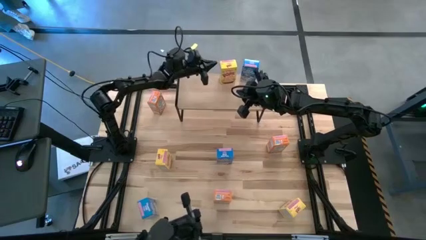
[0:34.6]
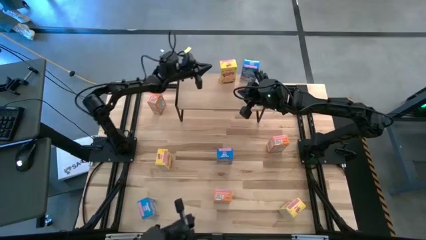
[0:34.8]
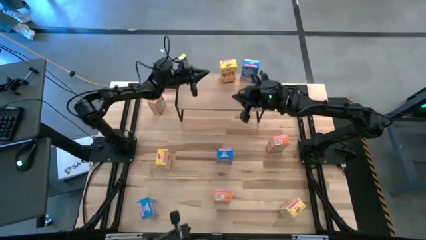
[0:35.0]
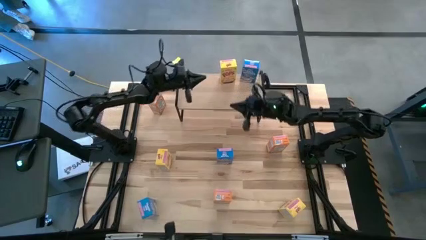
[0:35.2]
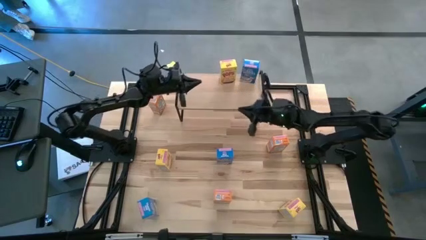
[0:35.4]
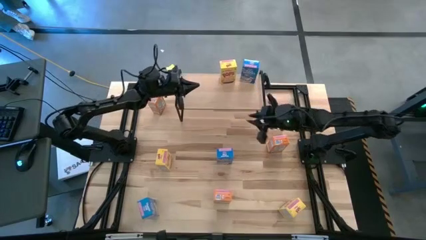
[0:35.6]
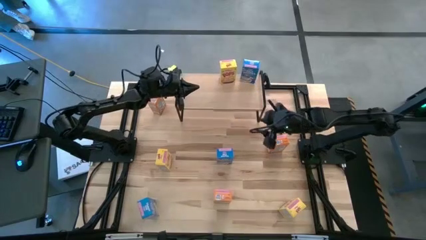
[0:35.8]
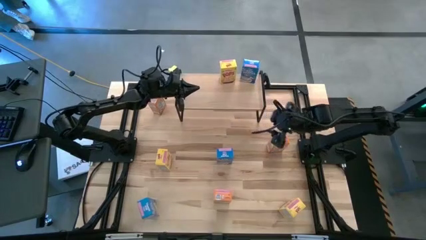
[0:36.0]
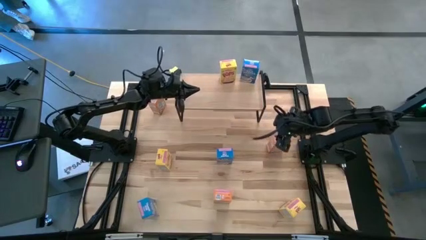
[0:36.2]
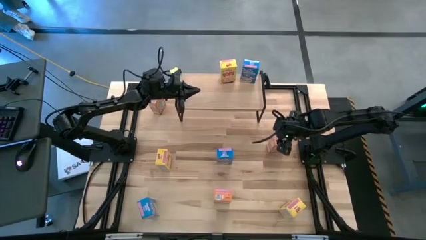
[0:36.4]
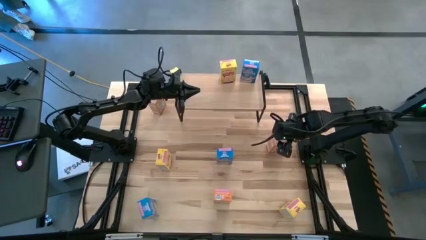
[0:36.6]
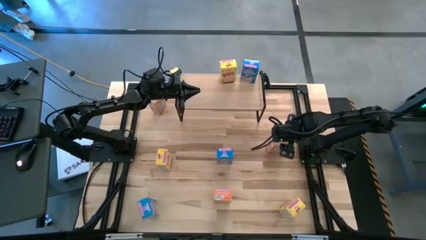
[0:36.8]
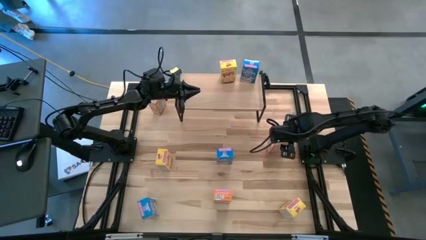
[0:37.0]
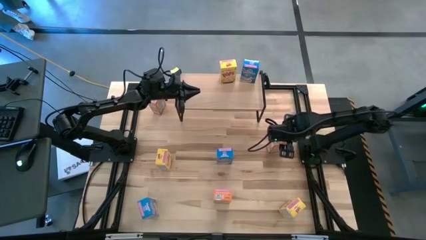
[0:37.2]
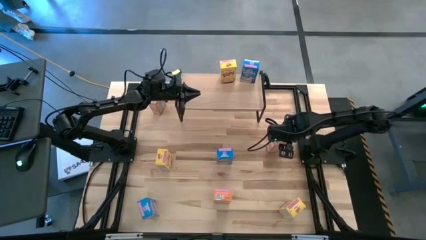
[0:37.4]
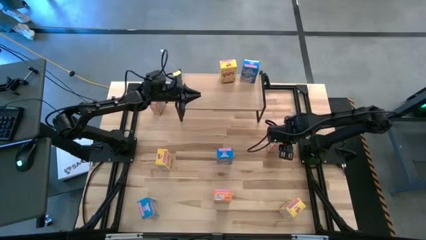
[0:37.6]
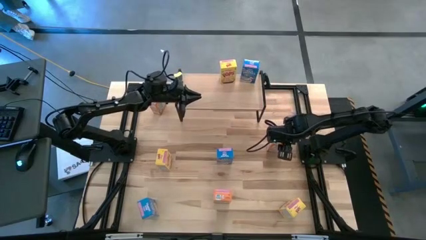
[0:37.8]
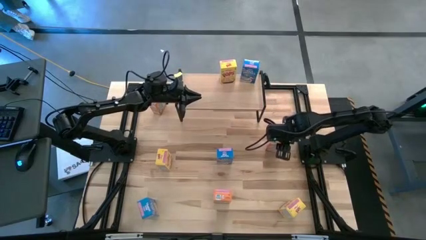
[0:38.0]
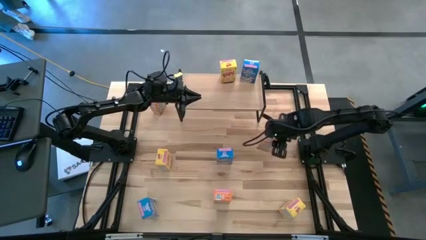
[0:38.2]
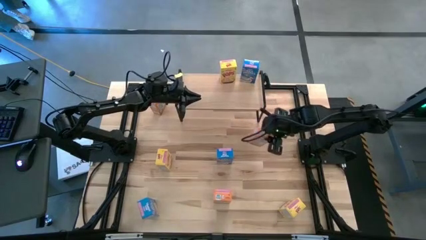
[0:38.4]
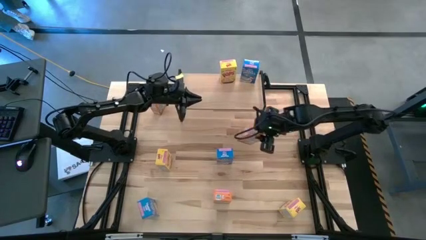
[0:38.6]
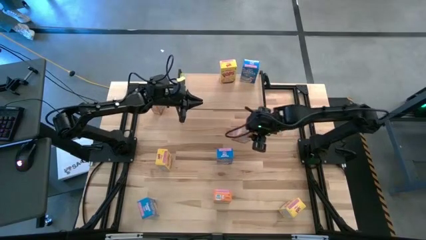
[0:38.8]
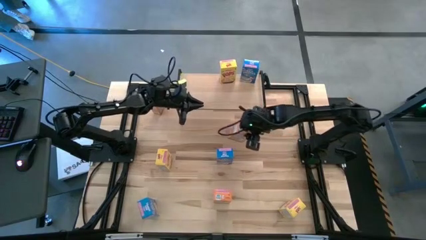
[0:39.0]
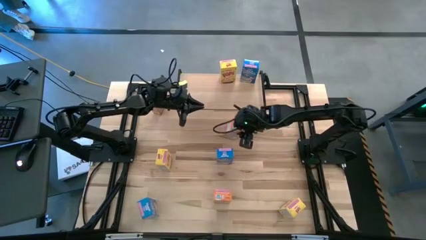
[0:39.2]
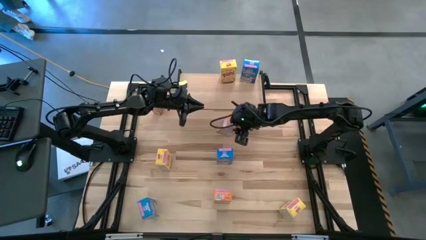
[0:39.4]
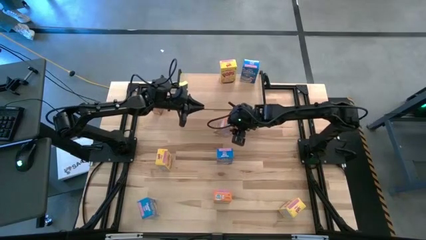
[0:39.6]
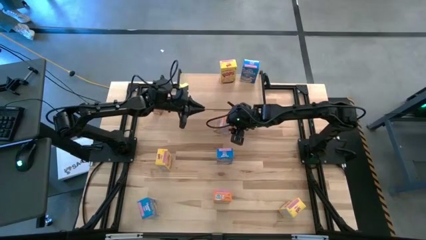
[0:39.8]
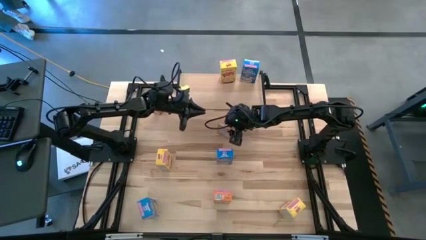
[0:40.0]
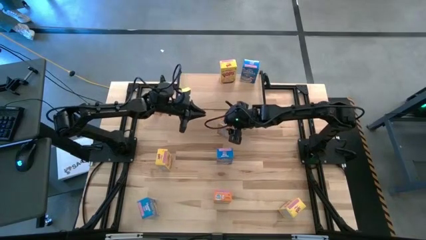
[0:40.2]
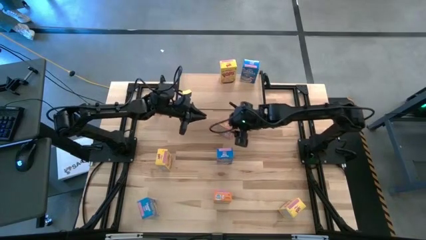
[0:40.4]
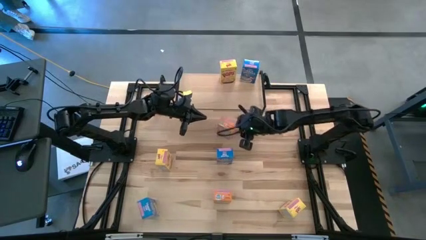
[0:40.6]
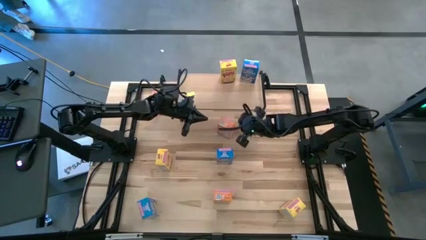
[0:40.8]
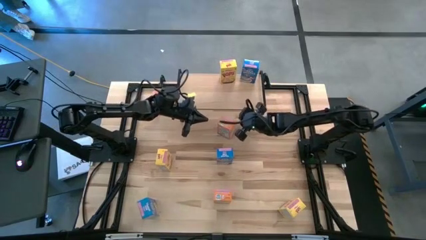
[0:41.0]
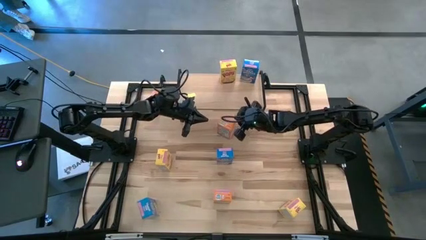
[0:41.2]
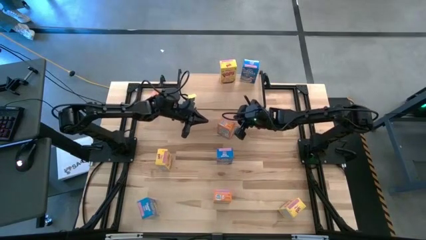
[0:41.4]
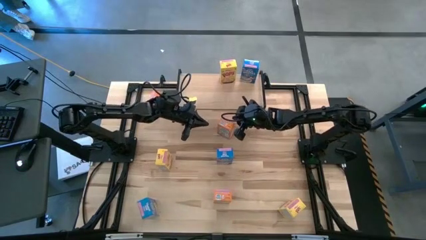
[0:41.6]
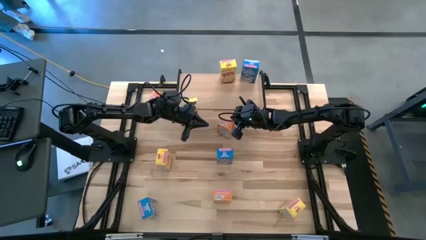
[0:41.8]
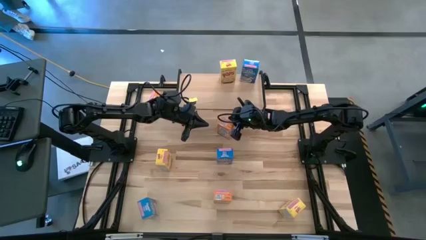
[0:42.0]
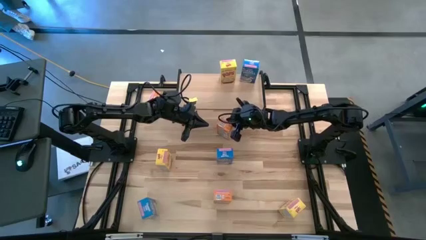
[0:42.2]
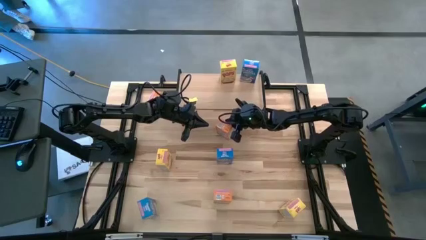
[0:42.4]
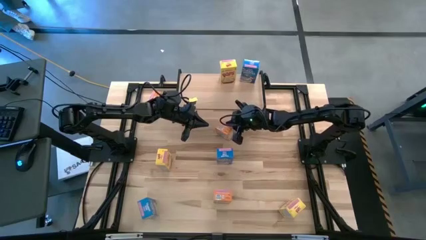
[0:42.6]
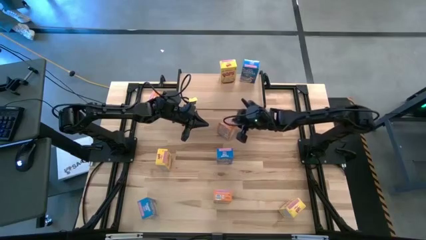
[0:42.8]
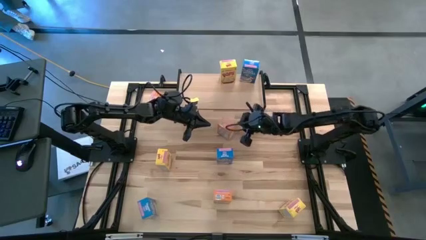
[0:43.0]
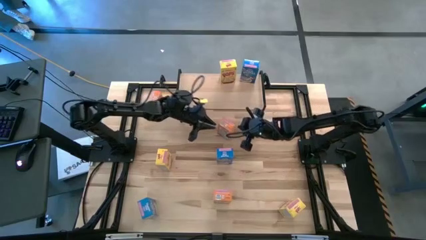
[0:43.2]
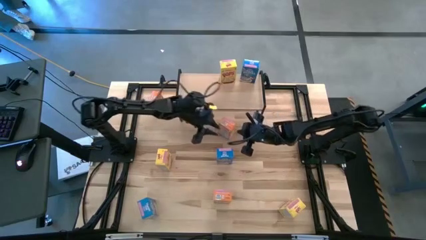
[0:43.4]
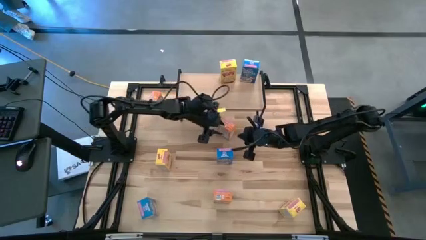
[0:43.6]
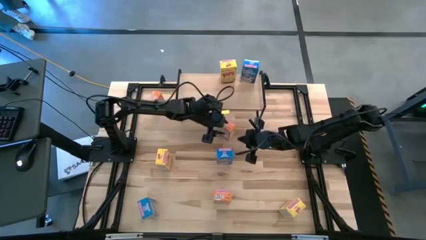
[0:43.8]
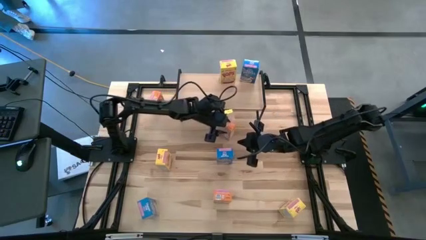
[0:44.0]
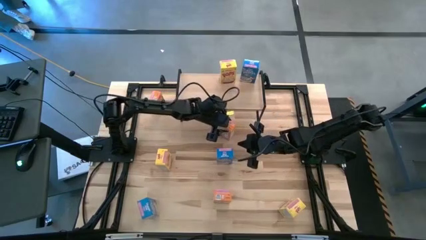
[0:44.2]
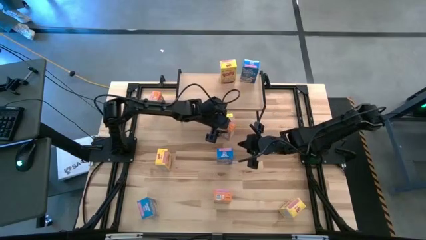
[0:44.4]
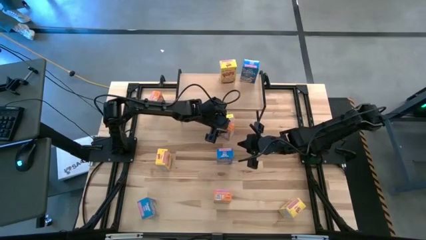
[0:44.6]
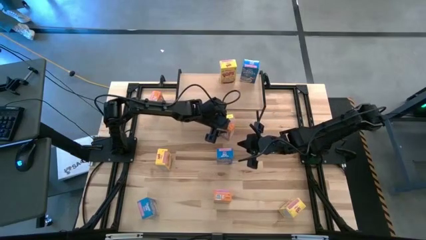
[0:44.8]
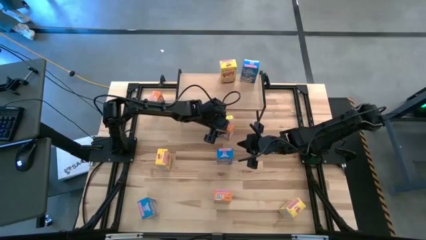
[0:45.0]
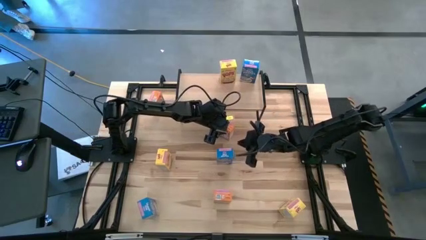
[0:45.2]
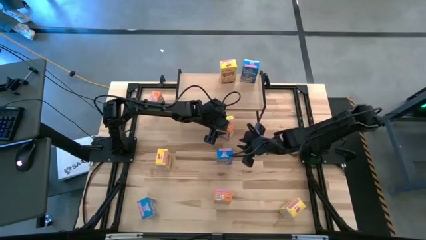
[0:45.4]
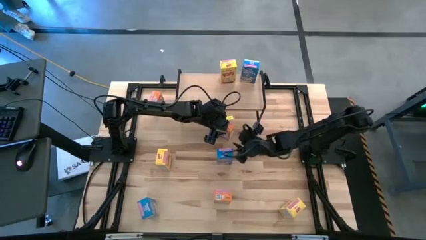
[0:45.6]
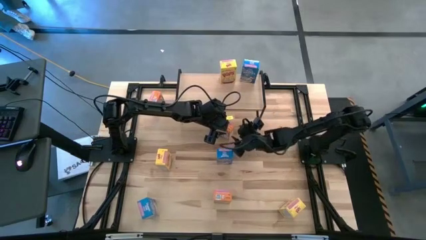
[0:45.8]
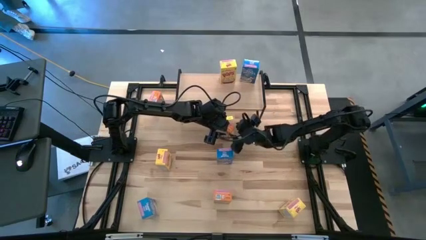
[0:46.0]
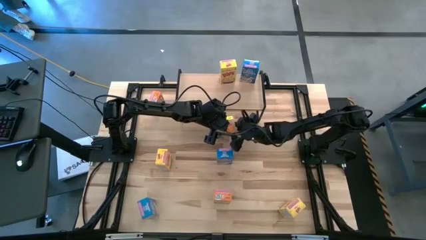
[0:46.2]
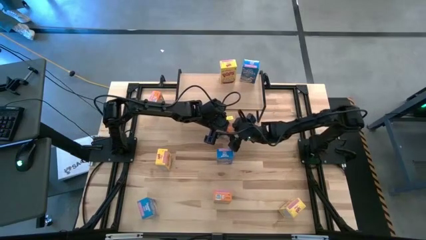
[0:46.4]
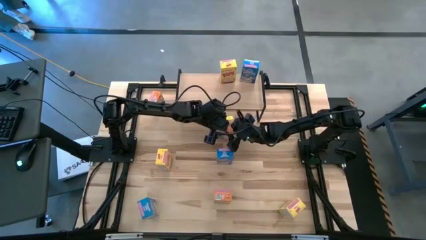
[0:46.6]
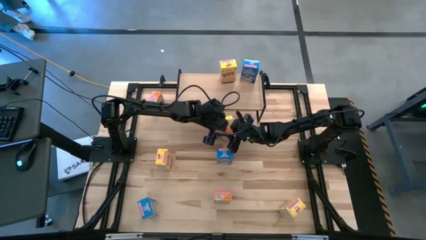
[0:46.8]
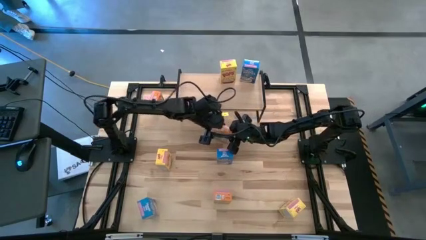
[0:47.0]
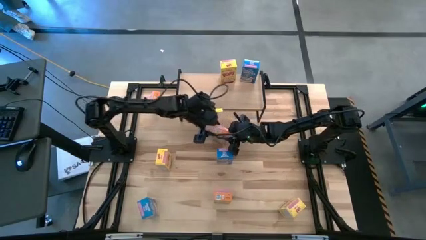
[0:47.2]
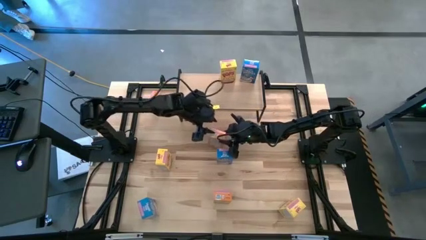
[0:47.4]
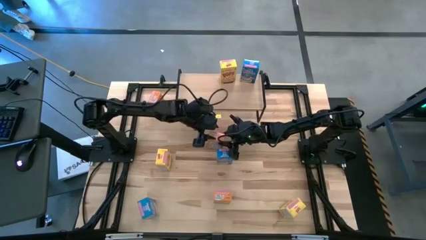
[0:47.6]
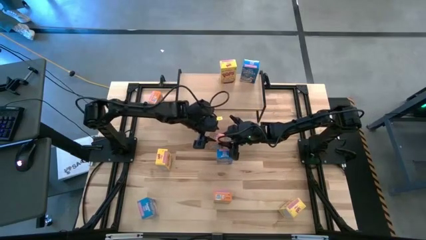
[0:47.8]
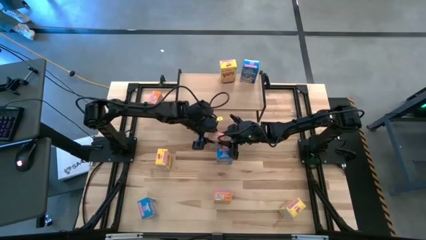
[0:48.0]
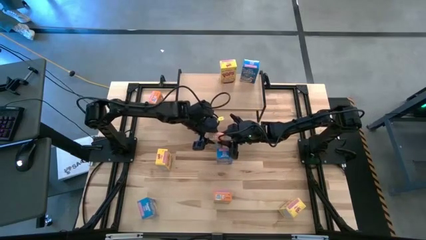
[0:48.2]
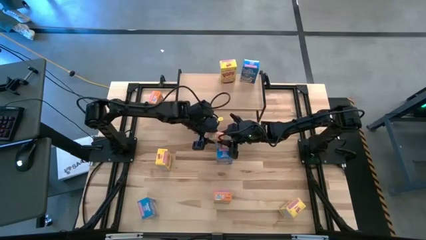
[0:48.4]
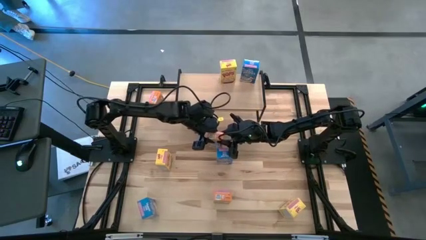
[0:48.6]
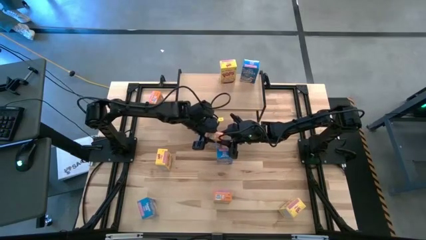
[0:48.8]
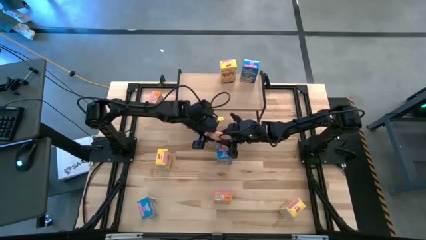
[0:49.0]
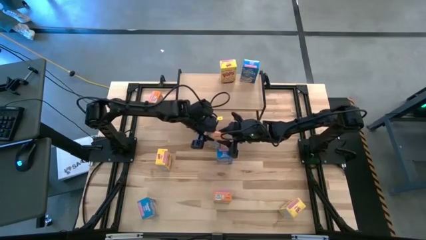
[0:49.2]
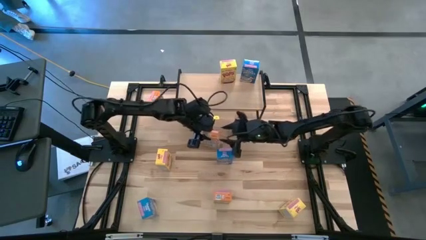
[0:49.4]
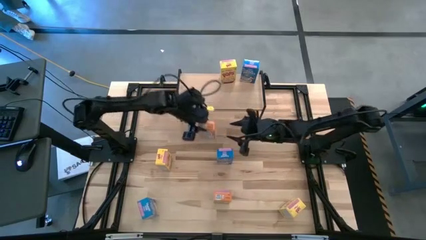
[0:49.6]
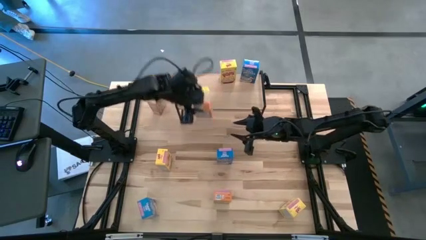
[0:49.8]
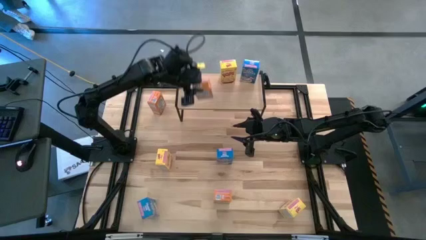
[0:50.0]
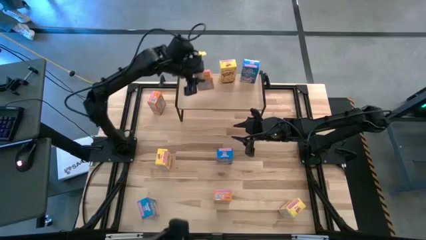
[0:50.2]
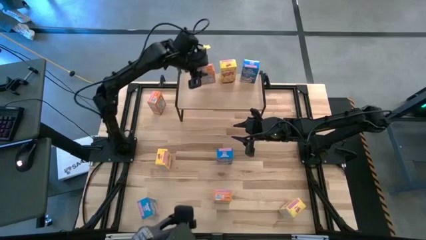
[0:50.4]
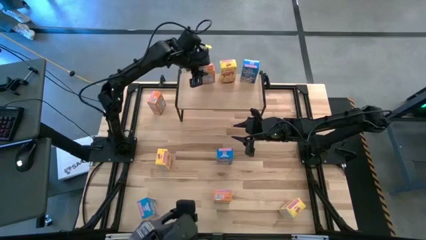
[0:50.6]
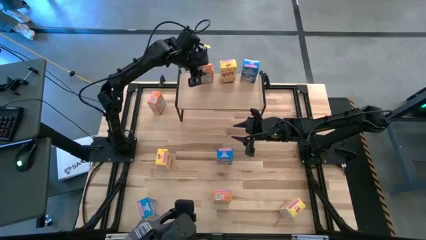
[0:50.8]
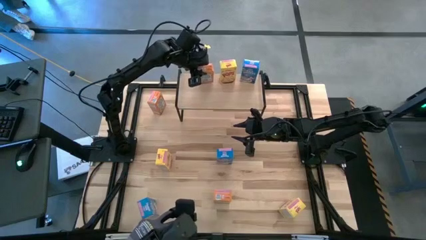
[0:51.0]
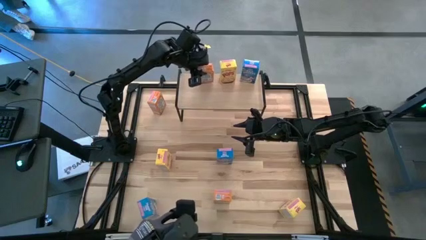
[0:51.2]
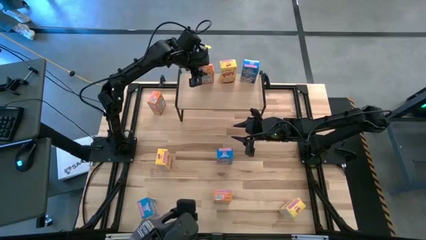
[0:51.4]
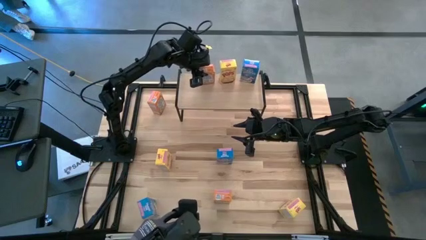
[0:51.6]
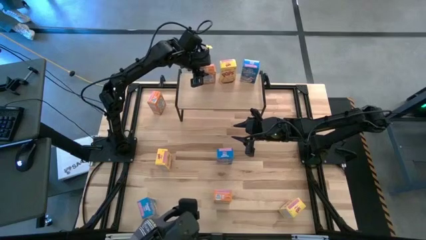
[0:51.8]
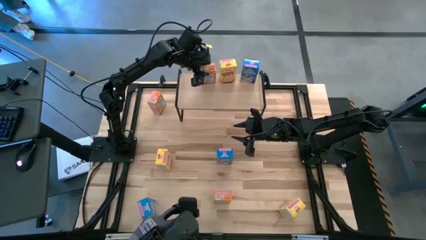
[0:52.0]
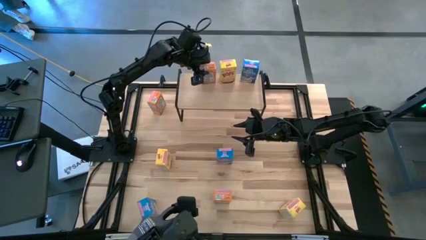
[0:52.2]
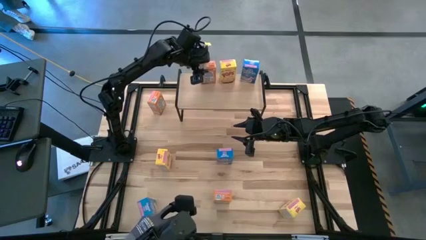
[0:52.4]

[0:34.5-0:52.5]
Task: Stack cereal on shelf
Put the middle right orange cereal box on the shelf
